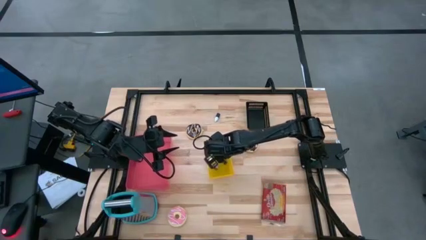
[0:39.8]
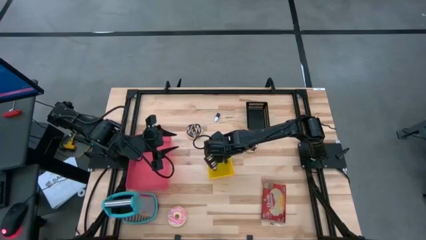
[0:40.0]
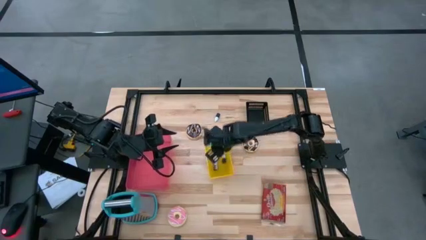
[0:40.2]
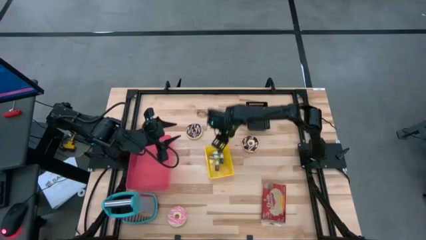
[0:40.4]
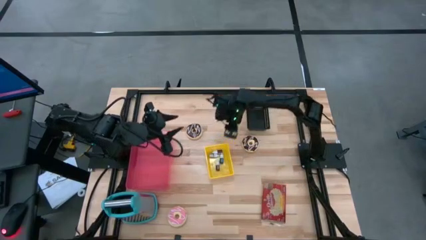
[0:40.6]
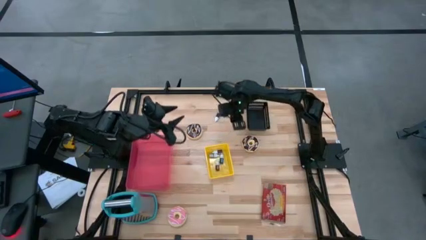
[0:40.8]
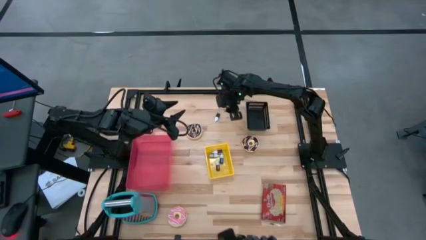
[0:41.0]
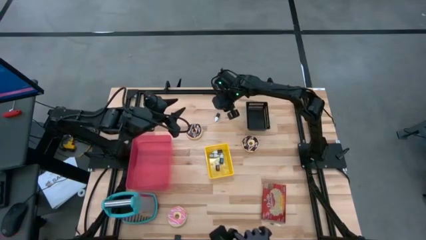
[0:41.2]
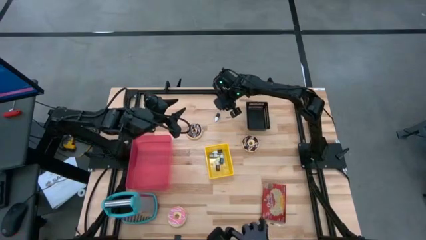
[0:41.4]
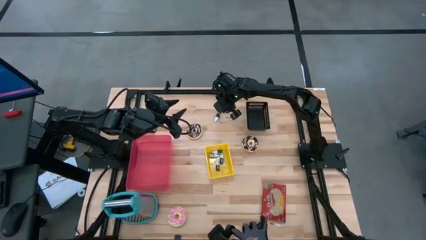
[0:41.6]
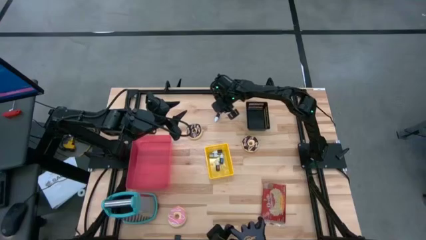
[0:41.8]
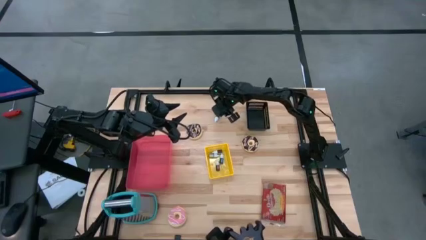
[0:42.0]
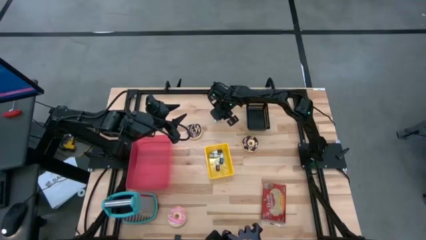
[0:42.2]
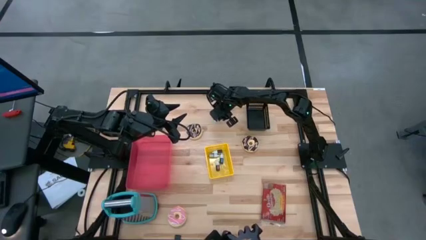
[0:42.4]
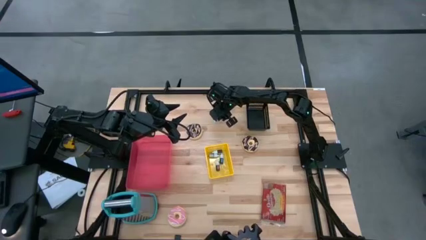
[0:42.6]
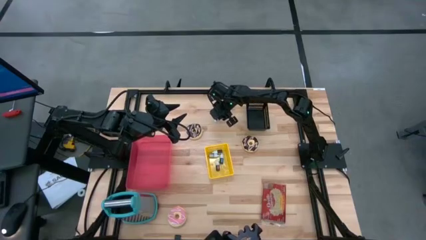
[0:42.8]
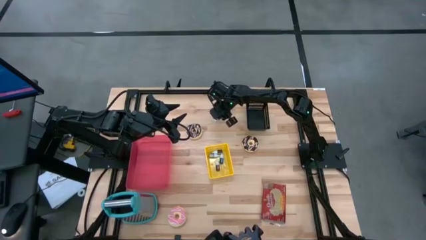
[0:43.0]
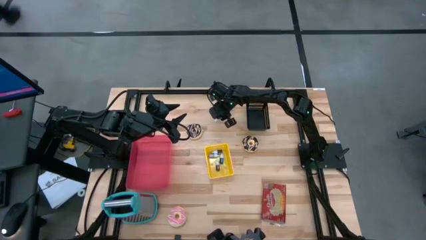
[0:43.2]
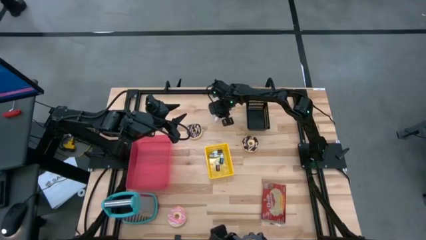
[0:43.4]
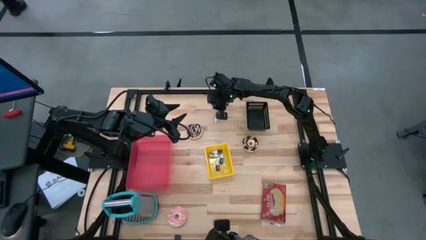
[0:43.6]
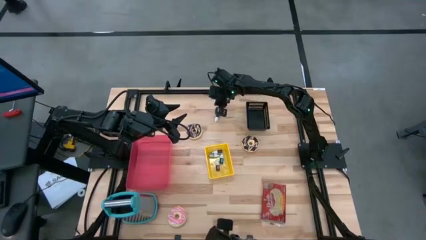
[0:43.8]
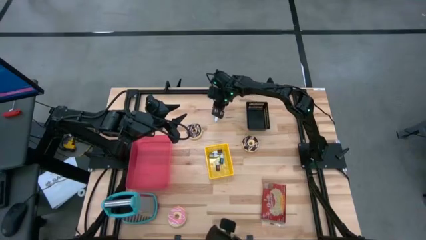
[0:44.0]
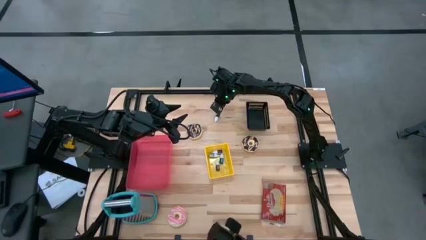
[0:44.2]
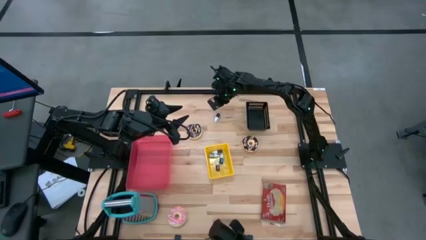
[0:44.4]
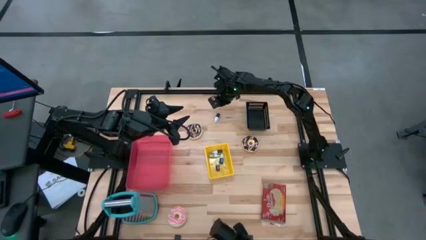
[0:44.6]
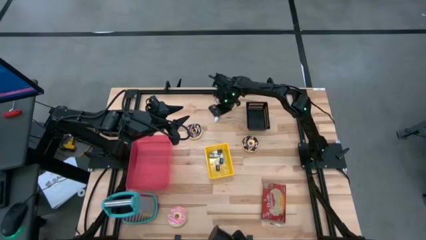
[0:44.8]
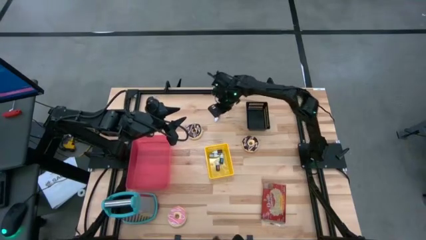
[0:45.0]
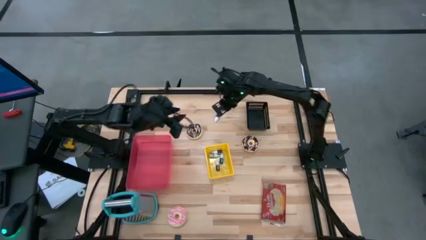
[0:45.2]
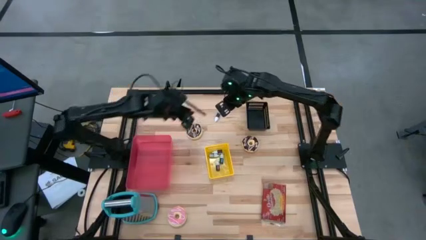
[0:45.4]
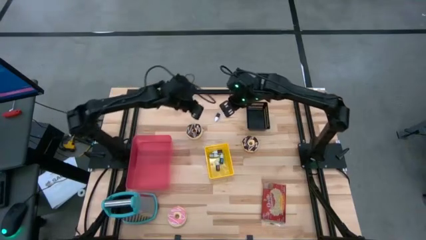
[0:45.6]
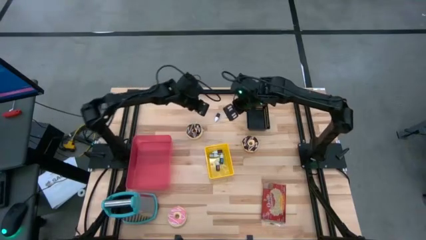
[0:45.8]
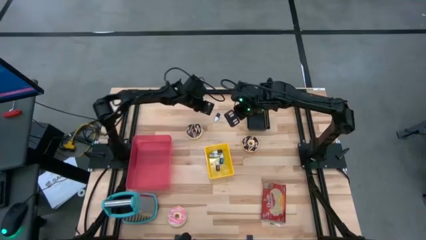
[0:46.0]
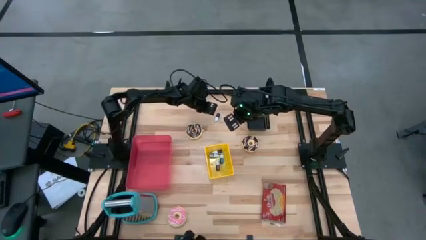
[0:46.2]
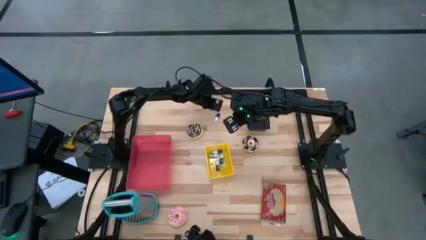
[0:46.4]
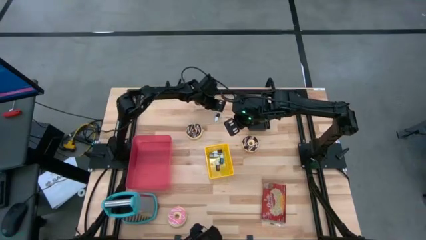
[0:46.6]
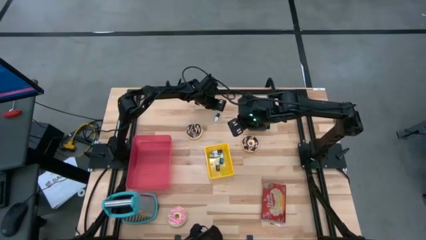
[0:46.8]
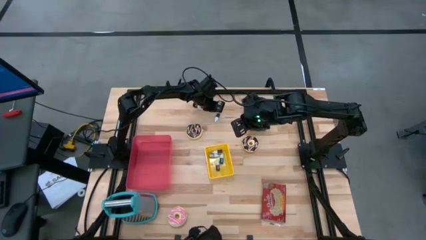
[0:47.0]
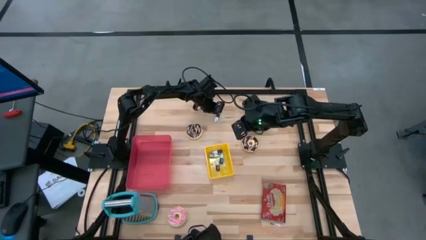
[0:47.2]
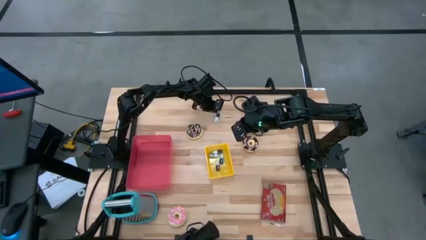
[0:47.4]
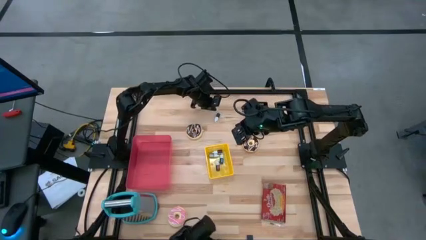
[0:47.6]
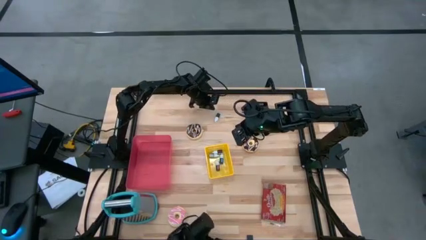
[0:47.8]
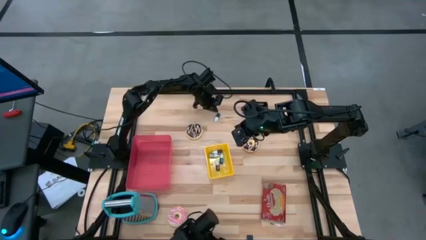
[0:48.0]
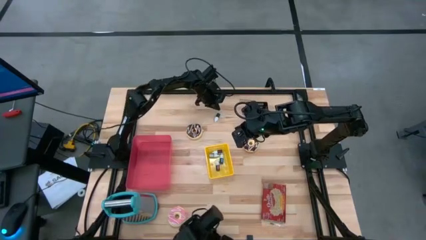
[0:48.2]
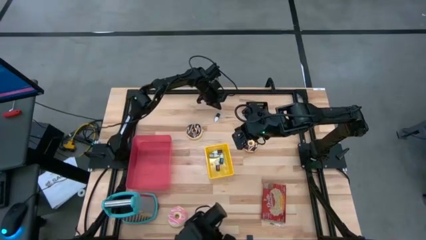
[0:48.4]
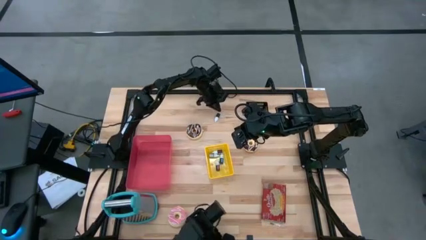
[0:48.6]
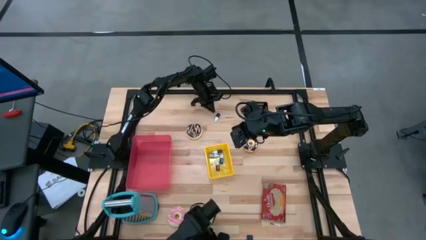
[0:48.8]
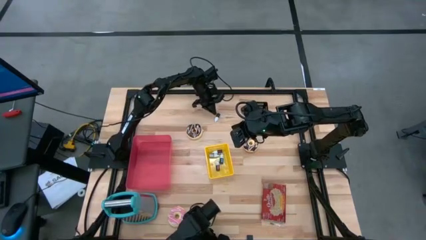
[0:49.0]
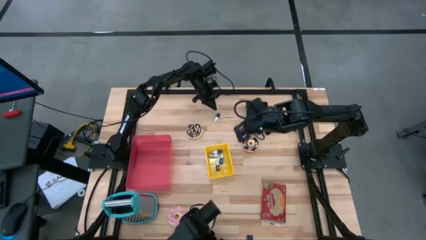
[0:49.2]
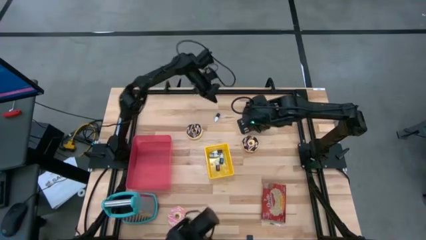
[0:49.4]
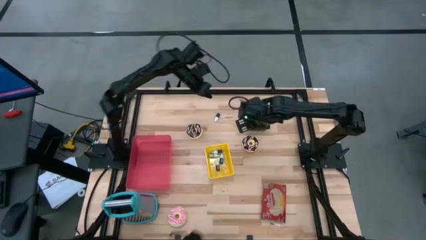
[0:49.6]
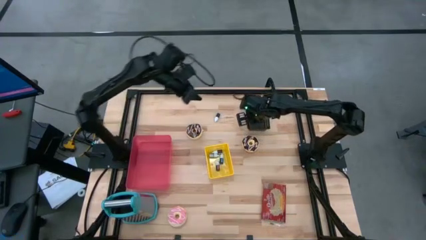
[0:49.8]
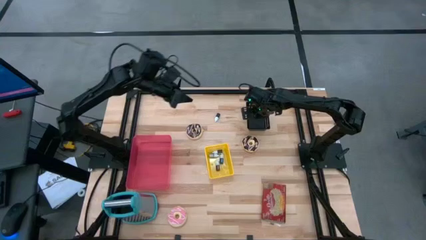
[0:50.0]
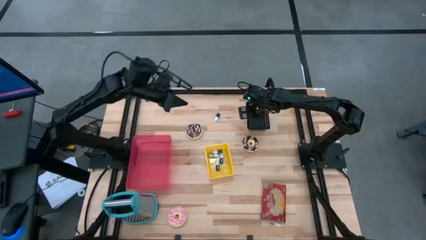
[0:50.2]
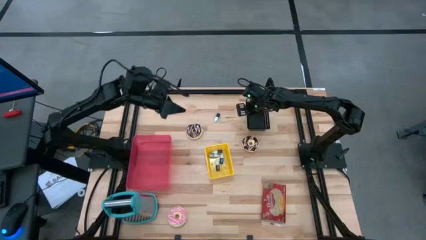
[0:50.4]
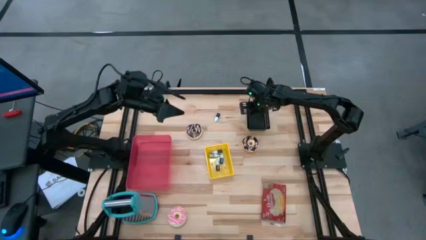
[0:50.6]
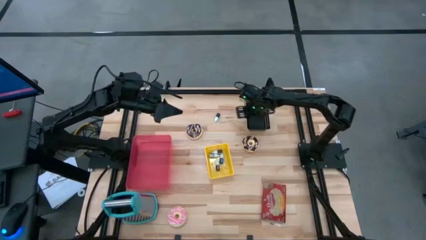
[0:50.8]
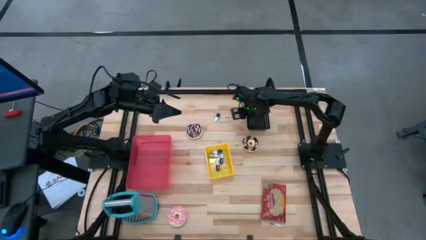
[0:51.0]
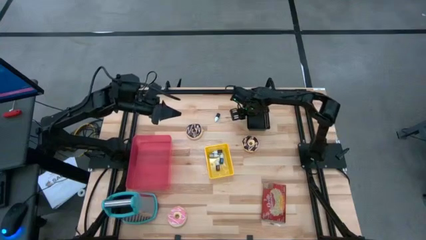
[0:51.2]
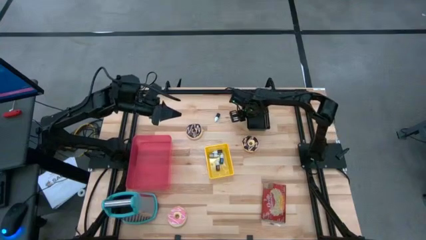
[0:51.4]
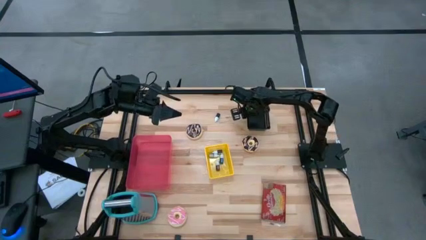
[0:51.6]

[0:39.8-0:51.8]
Put the black food coloring bottle into the yellow bin

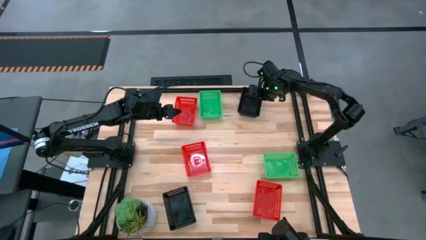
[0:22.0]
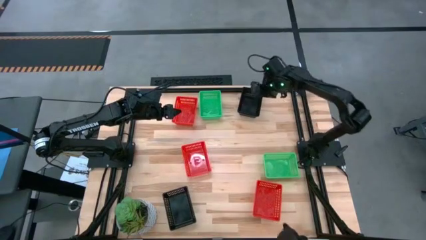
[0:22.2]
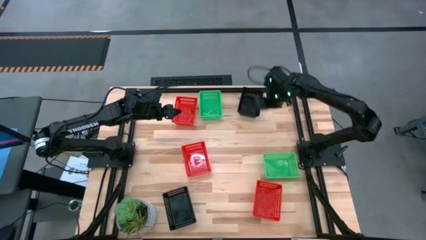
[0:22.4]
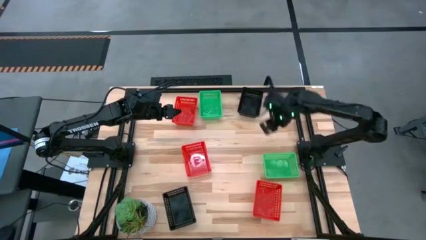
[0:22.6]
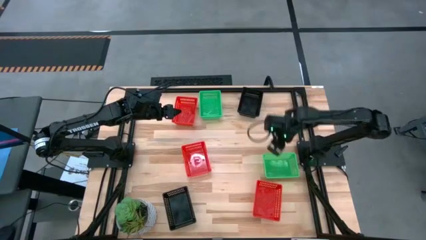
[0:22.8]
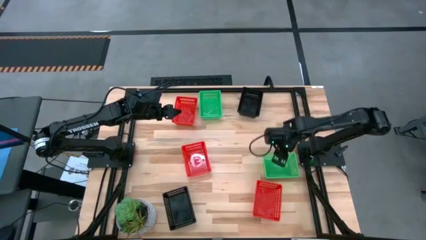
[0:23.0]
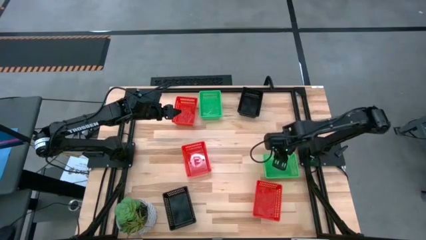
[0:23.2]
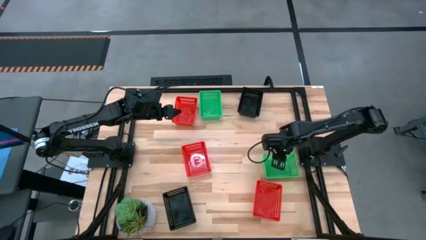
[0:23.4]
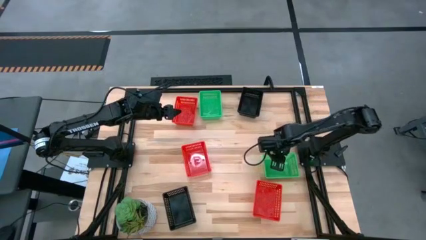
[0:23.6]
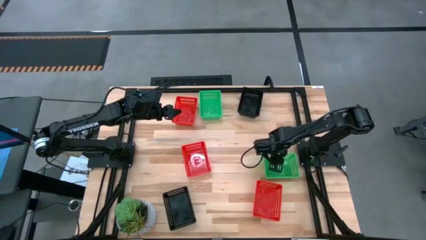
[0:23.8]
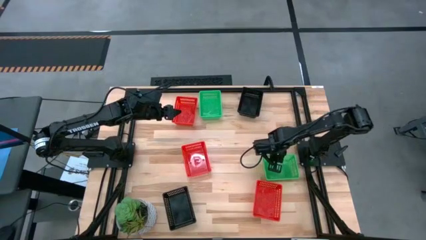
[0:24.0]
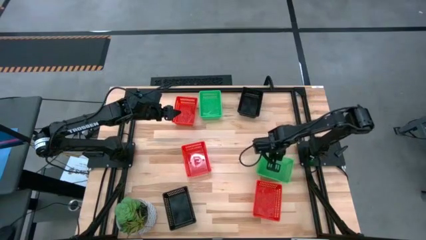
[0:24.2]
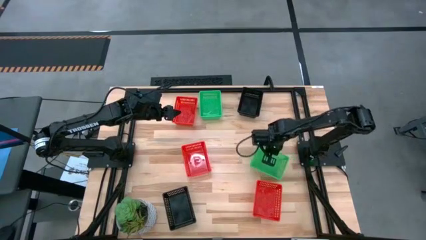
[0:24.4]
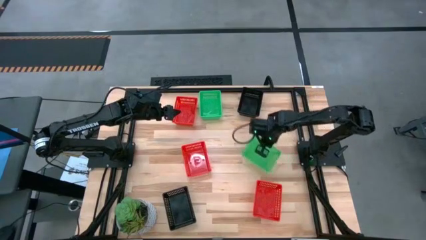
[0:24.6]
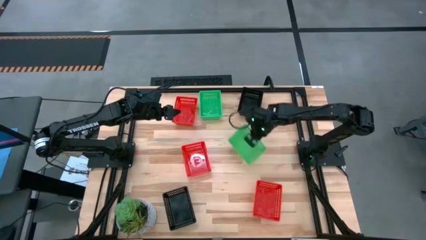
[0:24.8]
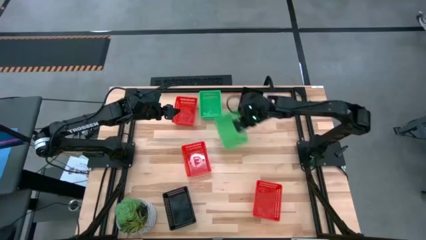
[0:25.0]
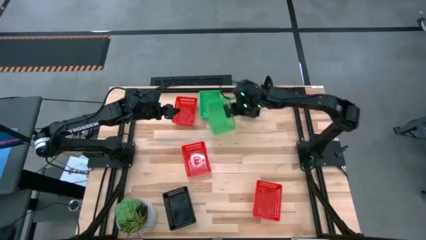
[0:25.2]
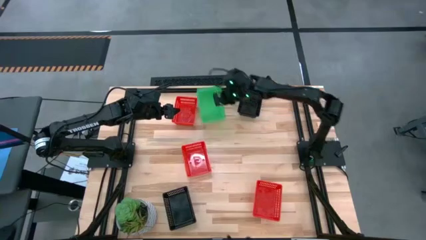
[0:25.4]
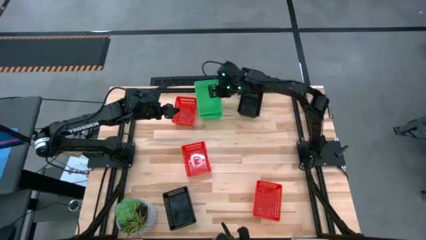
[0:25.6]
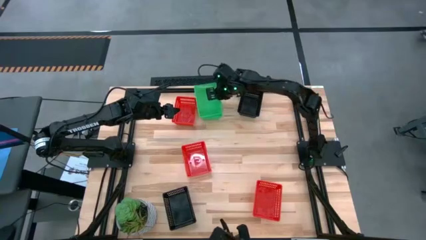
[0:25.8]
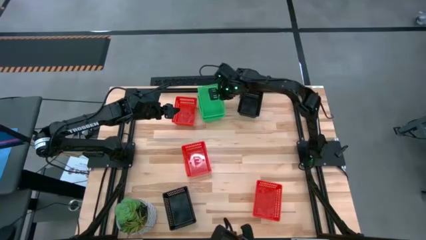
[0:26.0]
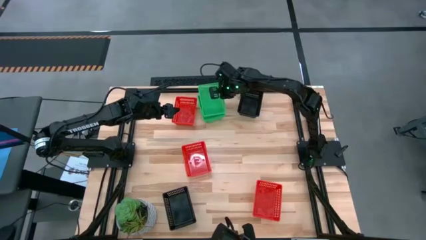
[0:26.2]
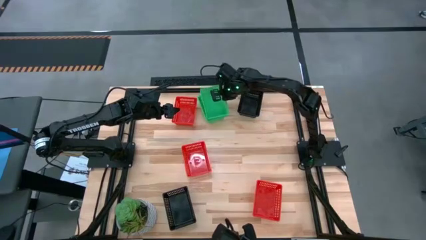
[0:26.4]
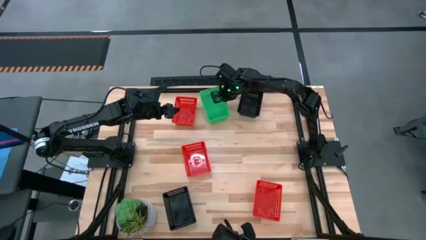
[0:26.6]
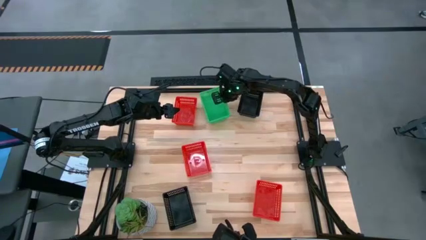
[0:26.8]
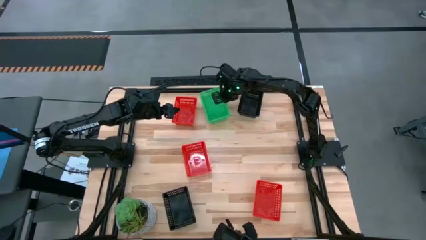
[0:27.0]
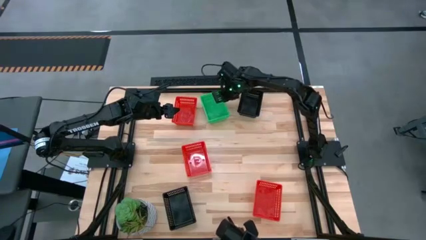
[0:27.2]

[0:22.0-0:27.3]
Stack the bottom green bin on top of the top green bins
